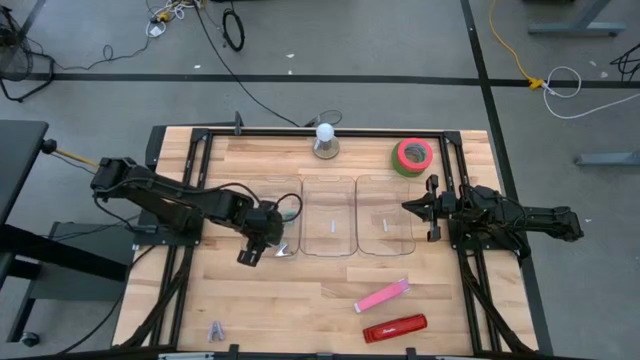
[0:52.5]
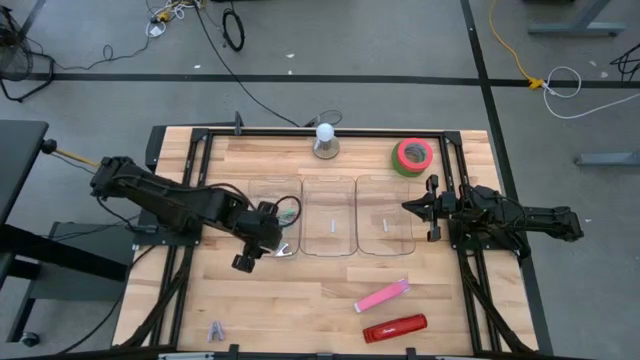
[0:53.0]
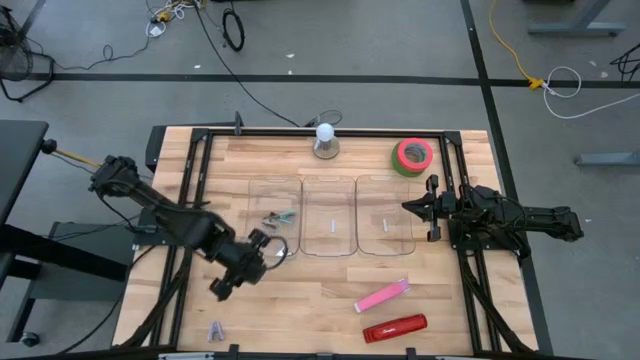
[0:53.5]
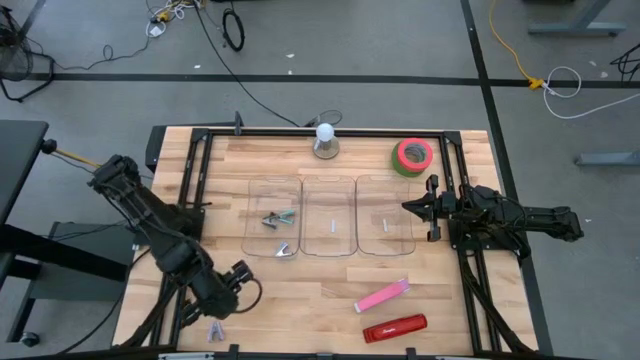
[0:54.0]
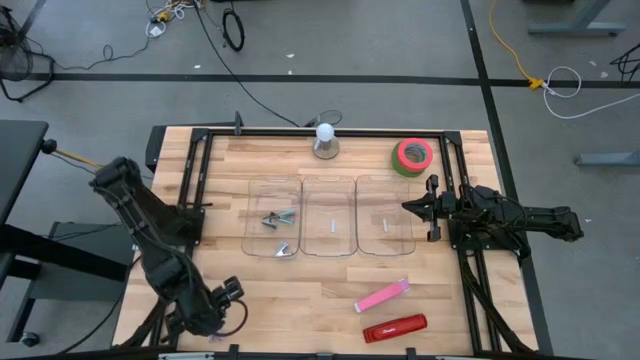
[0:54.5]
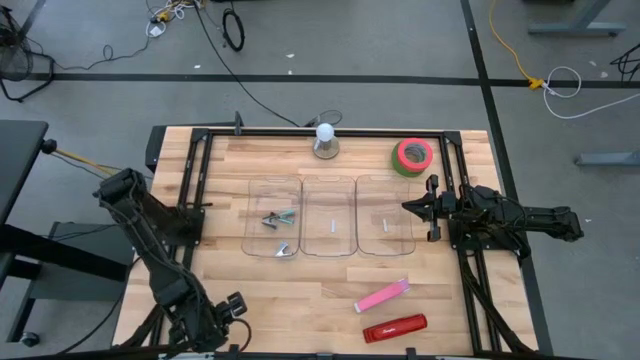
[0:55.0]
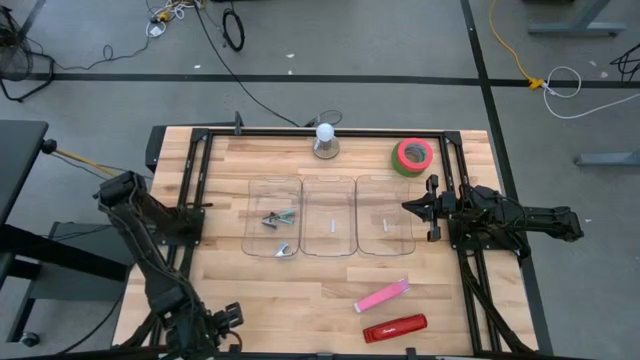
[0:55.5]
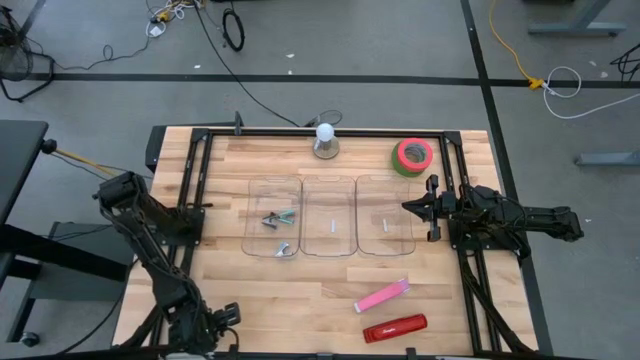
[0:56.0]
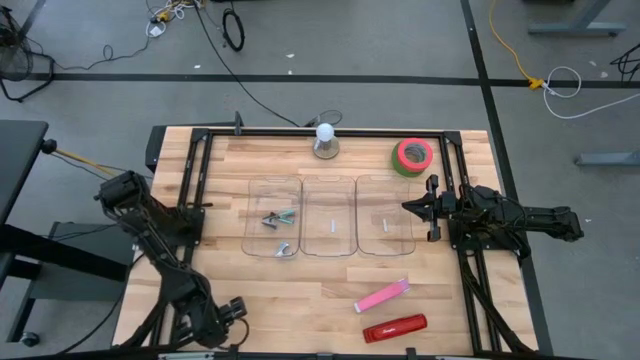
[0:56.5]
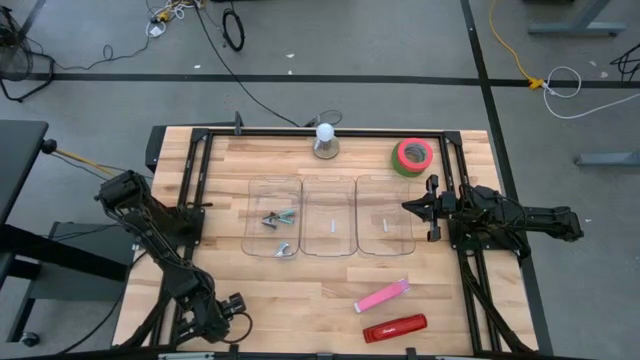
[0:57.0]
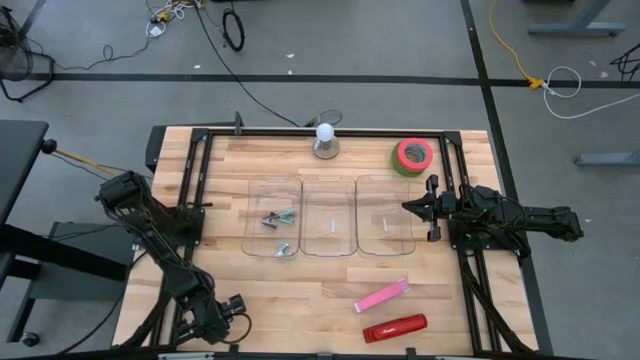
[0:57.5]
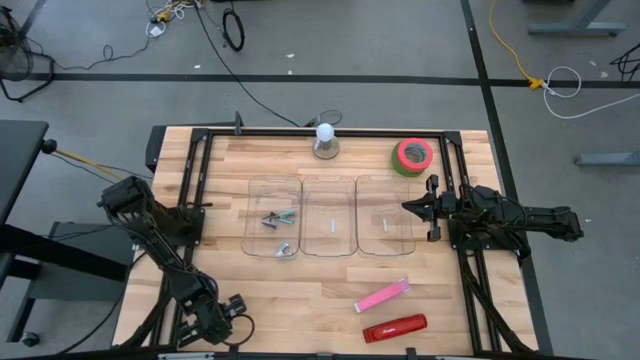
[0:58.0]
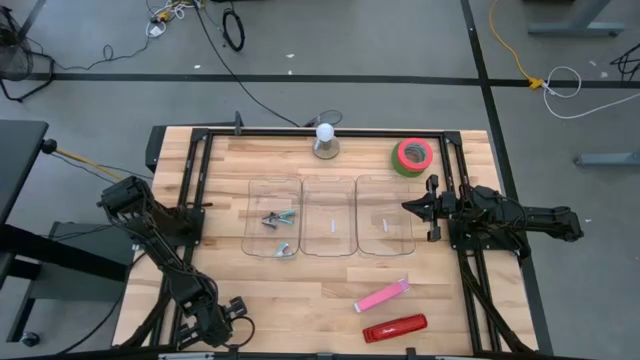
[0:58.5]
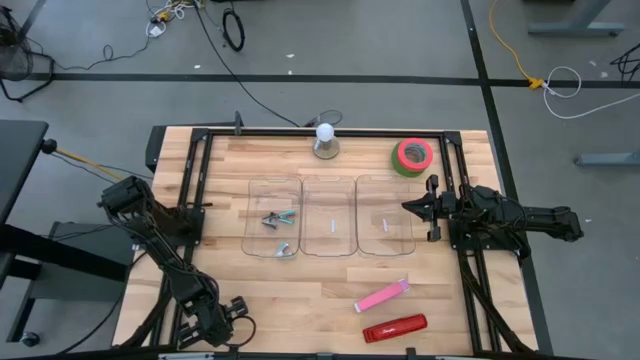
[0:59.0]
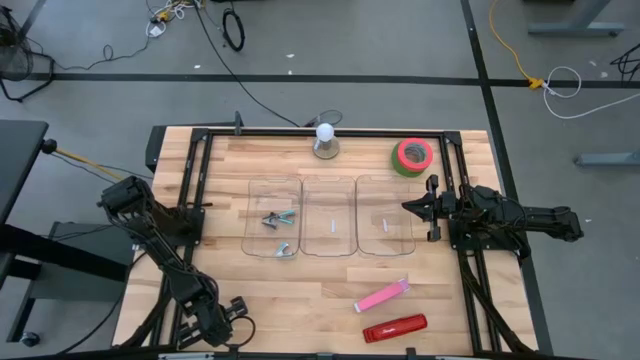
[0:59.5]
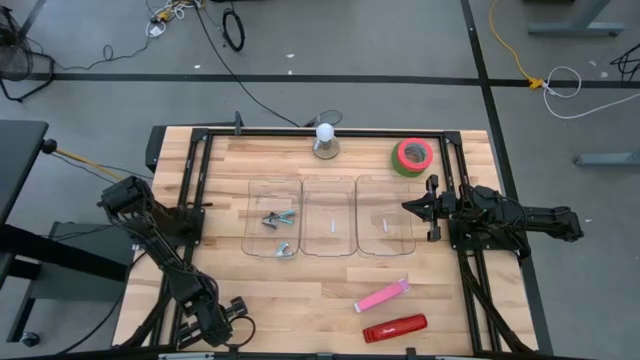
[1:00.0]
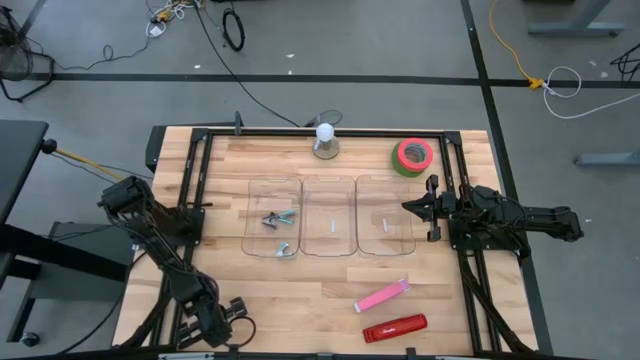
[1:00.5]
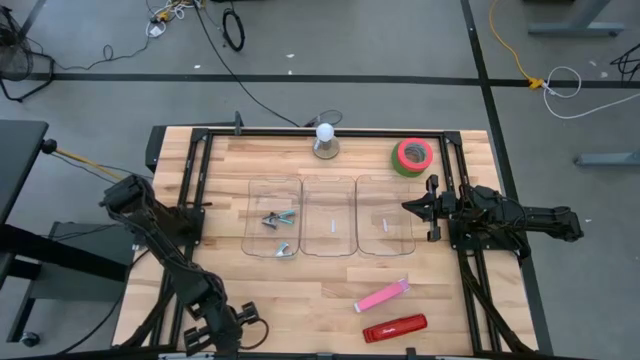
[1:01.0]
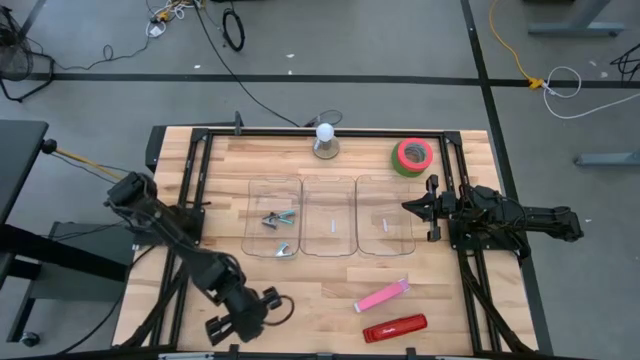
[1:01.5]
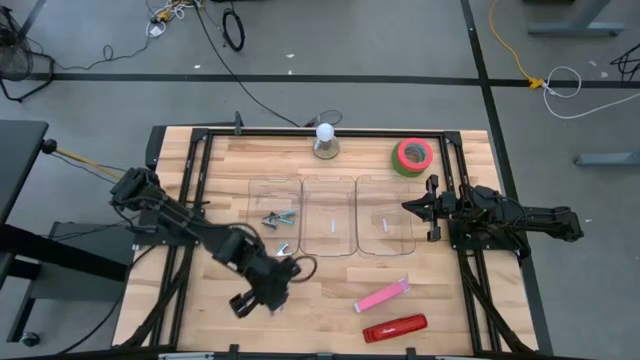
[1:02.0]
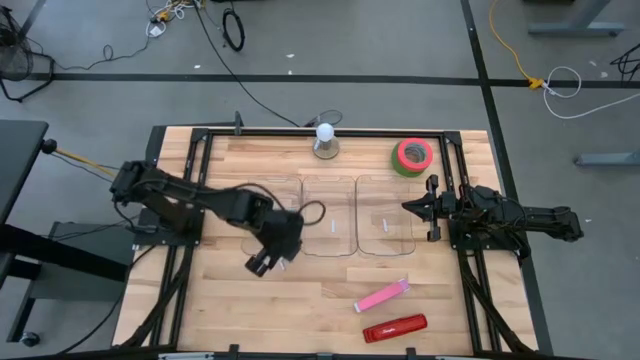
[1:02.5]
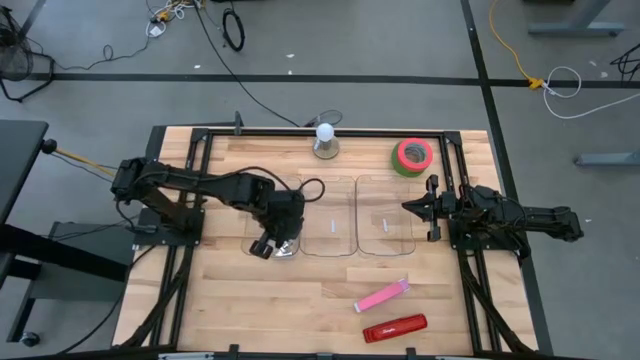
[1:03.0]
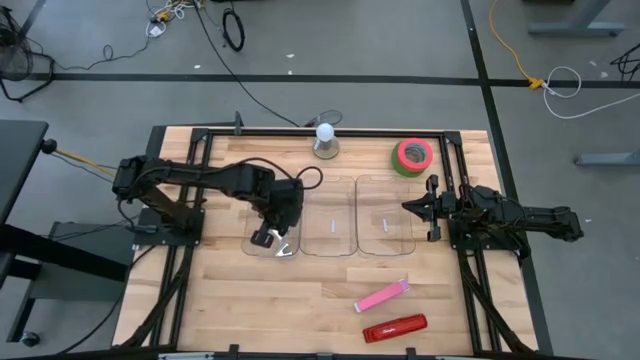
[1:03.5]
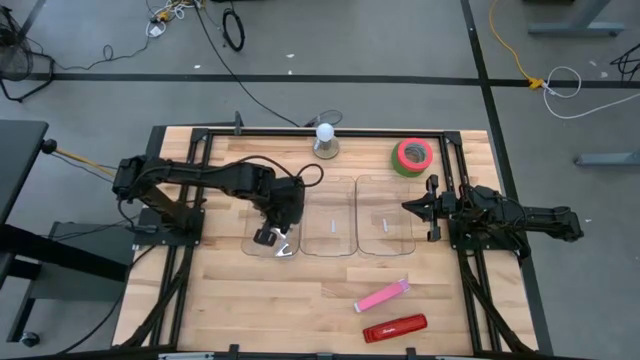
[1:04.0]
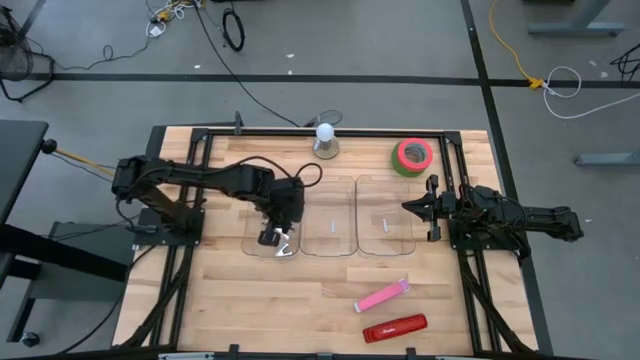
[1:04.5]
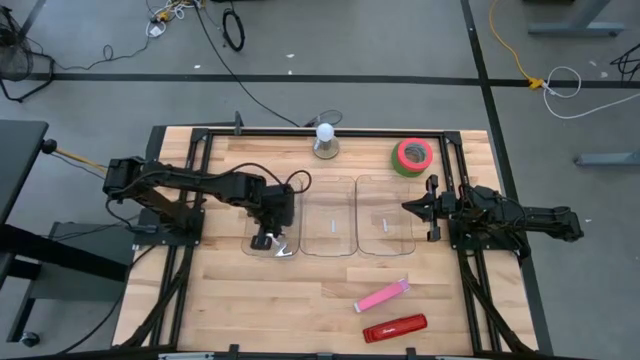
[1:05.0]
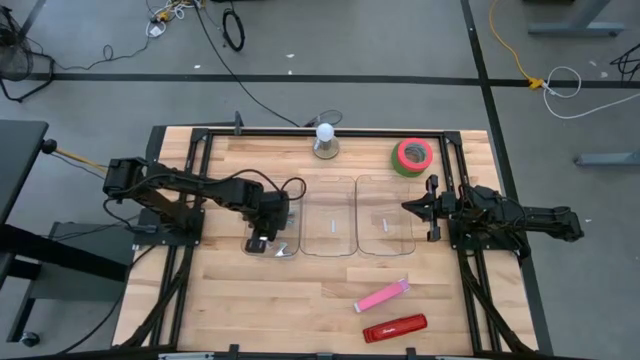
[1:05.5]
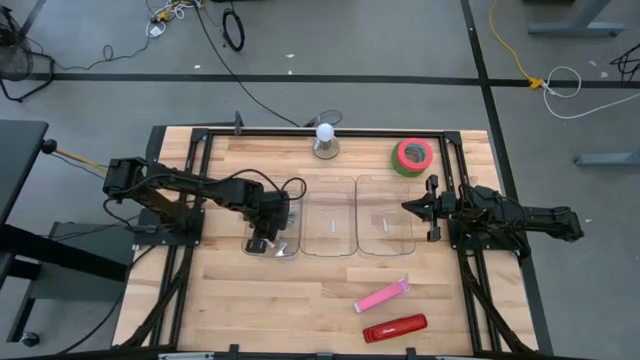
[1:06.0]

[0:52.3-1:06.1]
Task: Pick and place Stapler, Stapler remover, tape
Put the purple staple remover into the left transparent bin

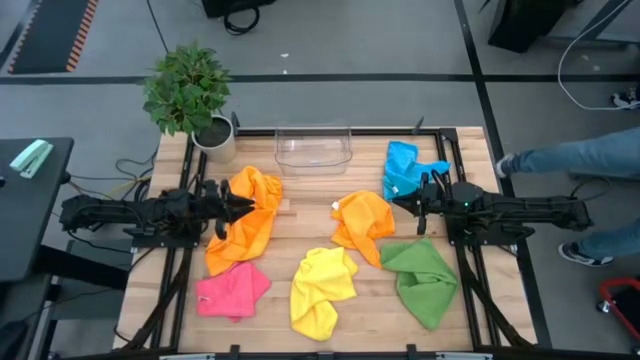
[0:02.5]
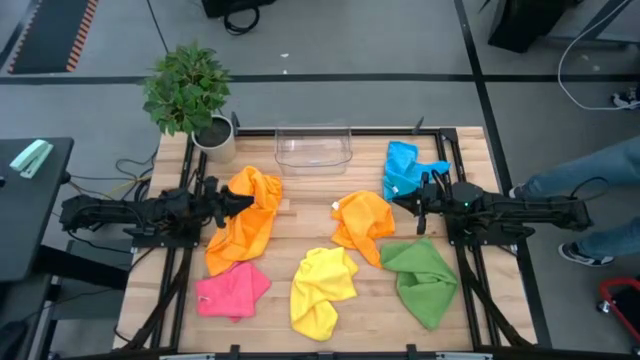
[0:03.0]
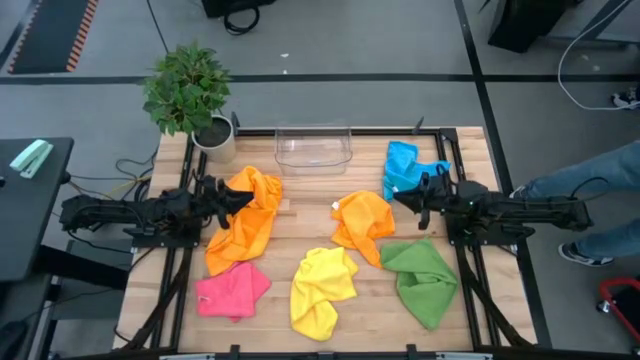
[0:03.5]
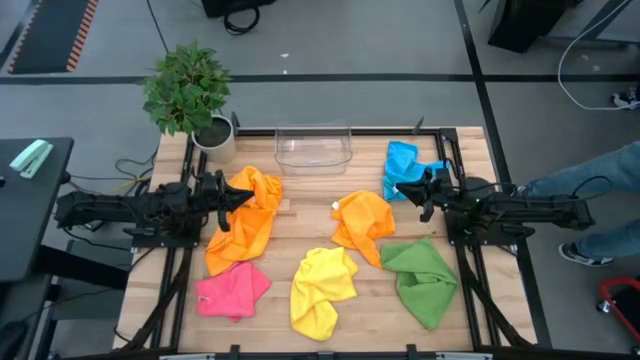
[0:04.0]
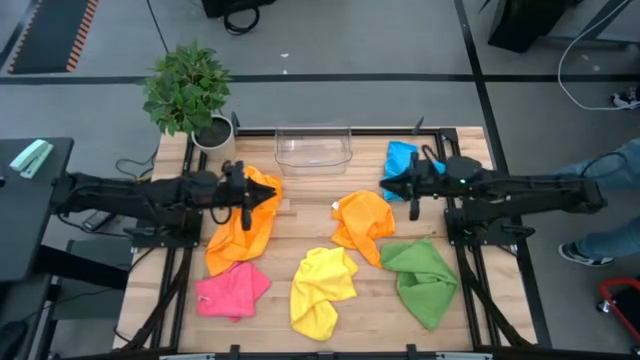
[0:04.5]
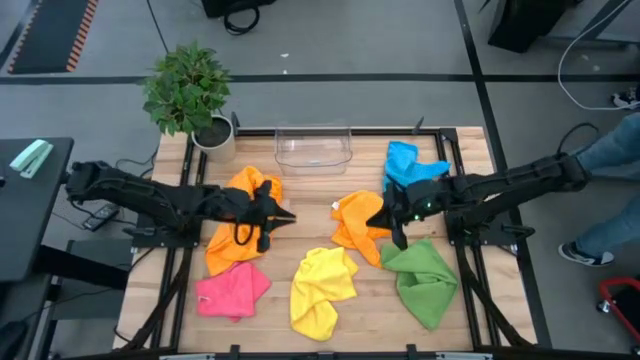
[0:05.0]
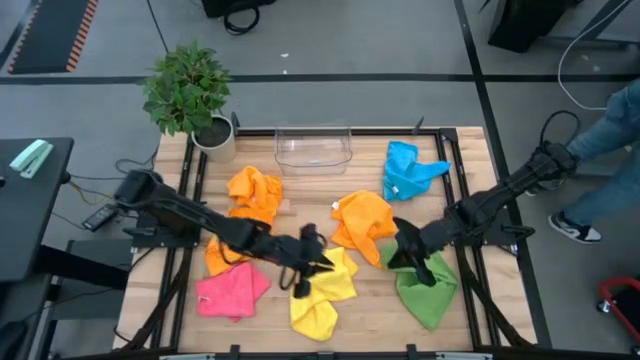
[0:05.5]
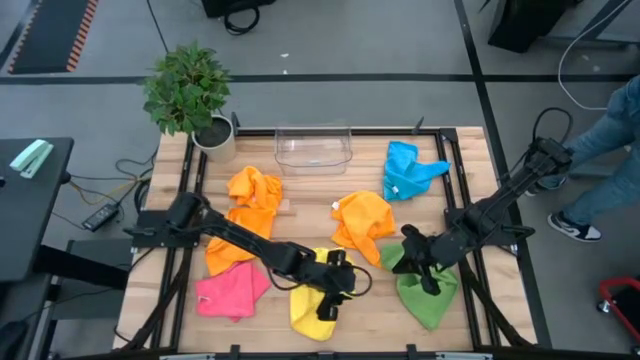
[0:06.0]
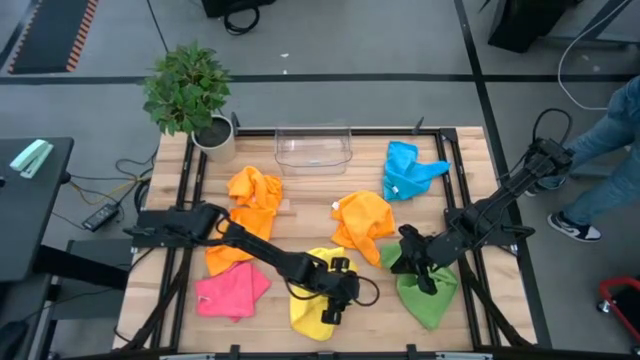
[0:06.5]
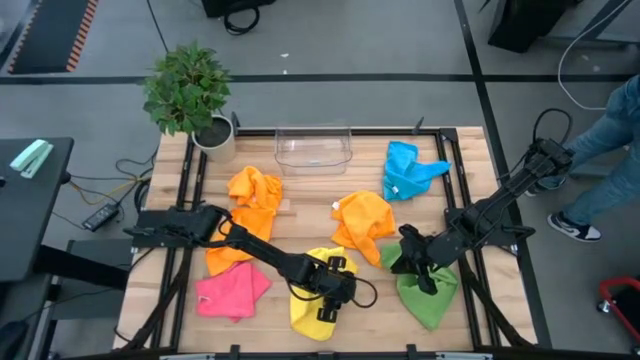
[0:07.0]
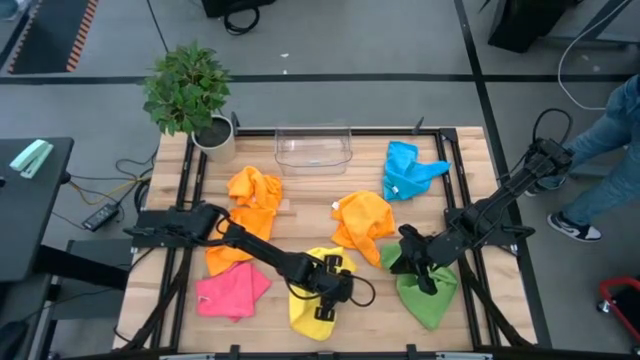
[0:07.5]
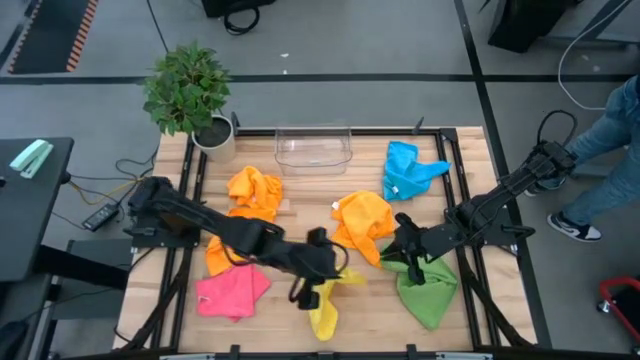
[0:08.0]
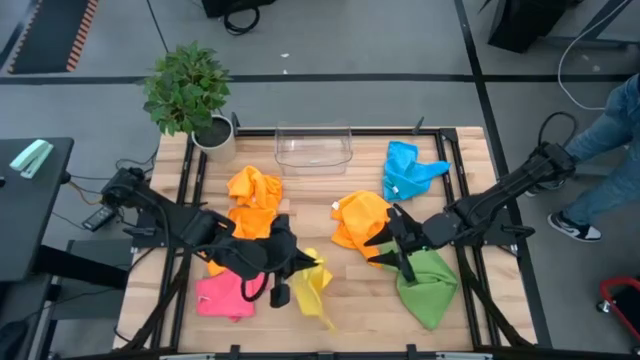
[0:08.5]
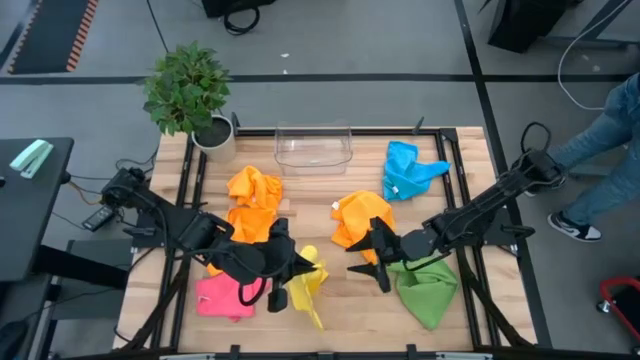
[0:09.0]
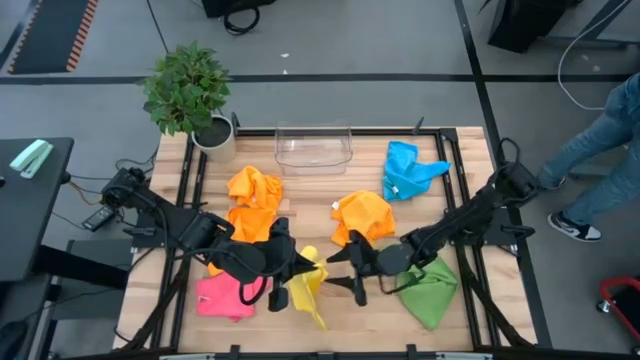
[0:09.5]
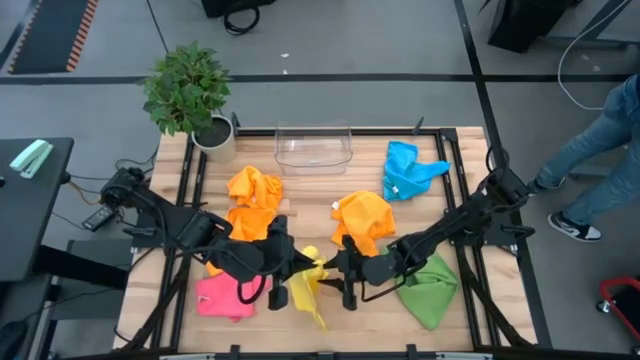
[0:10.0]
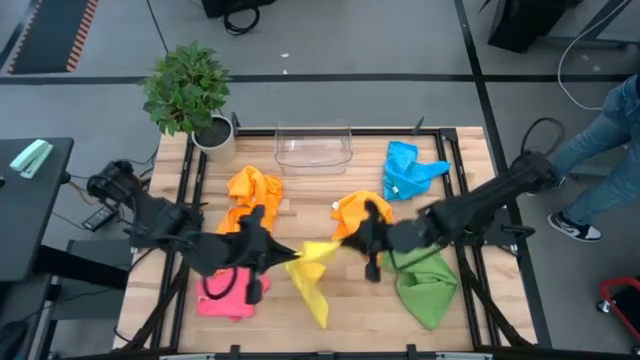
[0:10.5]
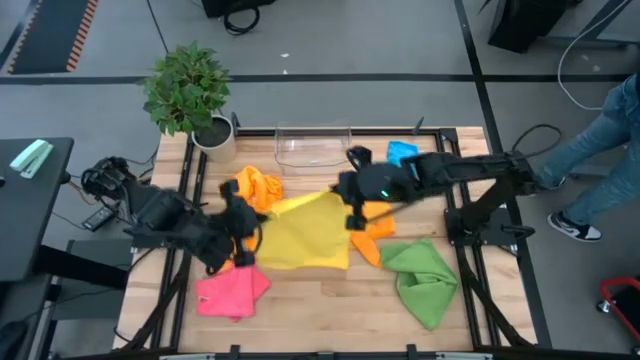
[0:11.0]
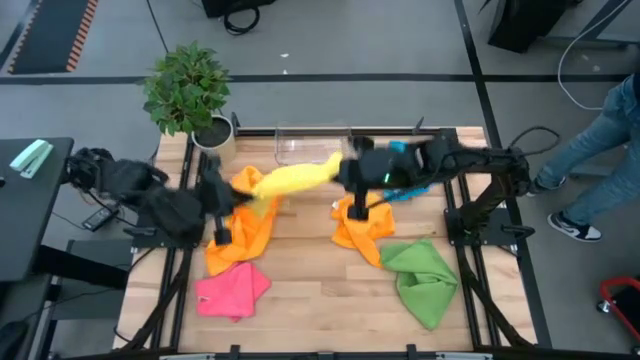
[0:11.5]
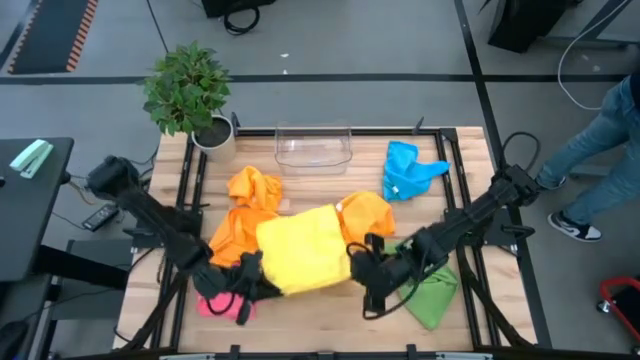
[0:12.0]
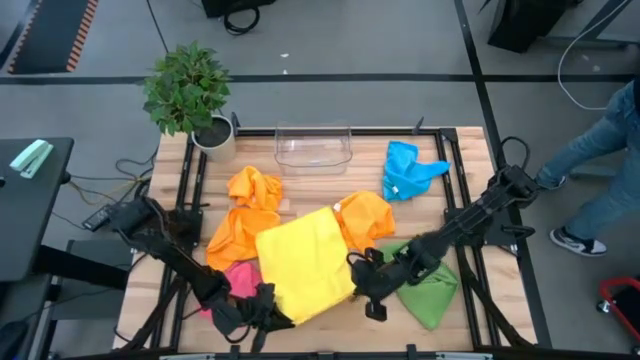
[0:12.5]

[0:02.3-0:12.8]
Task: Fold microfiber towels
Fold the yellow microfiber cloth
